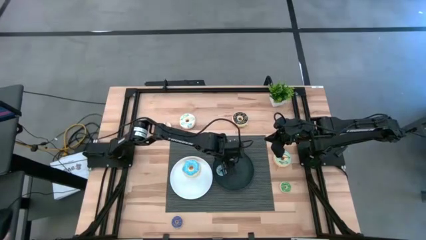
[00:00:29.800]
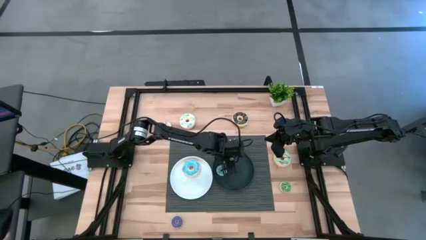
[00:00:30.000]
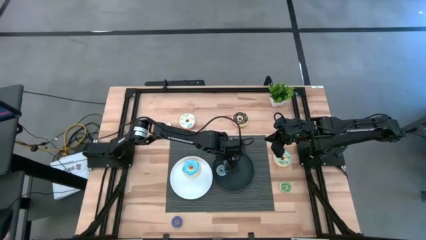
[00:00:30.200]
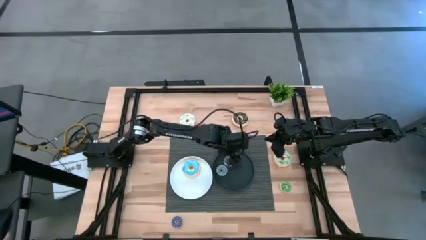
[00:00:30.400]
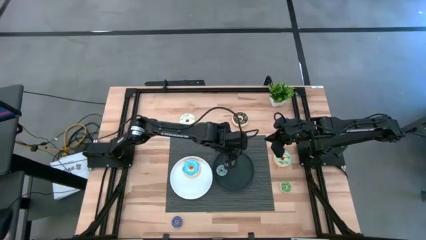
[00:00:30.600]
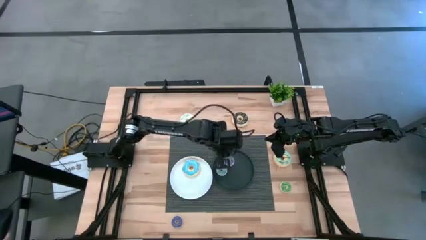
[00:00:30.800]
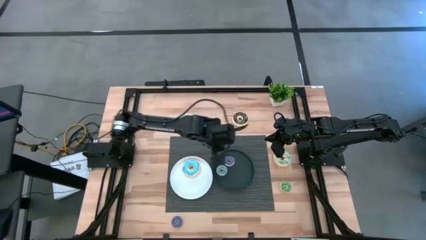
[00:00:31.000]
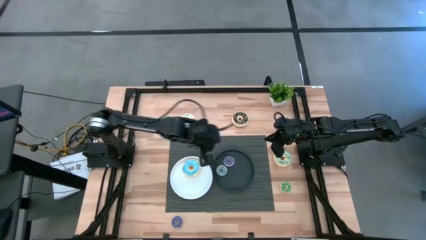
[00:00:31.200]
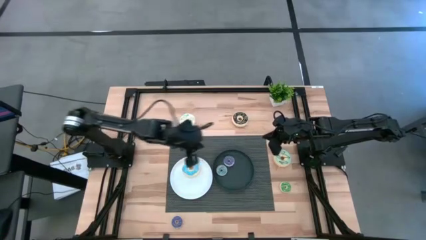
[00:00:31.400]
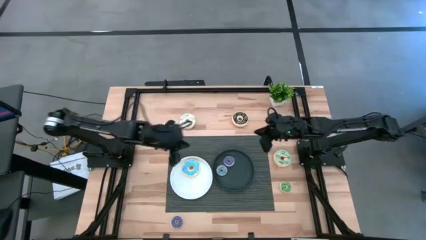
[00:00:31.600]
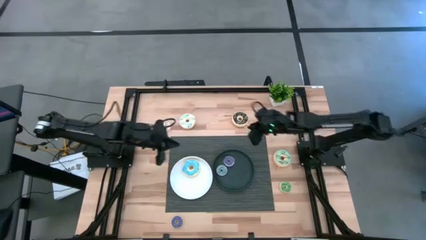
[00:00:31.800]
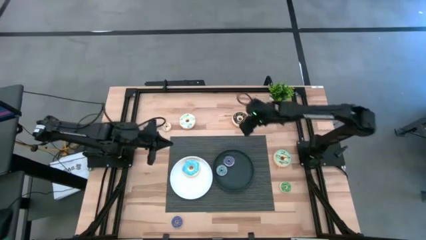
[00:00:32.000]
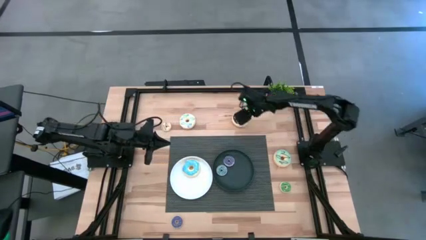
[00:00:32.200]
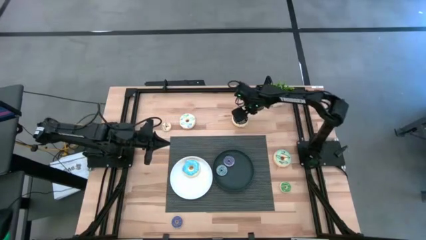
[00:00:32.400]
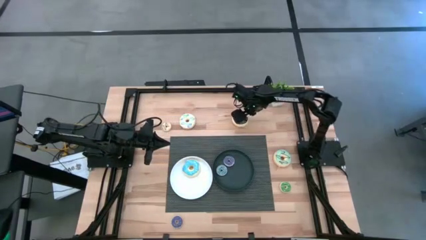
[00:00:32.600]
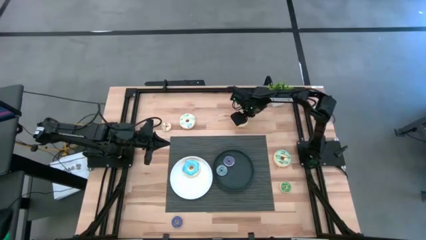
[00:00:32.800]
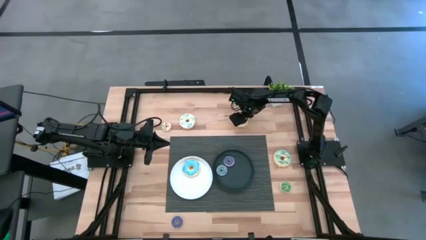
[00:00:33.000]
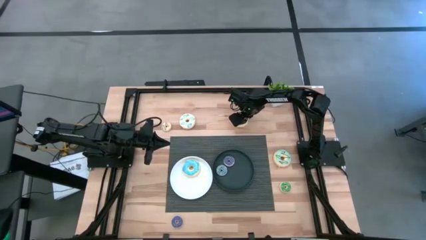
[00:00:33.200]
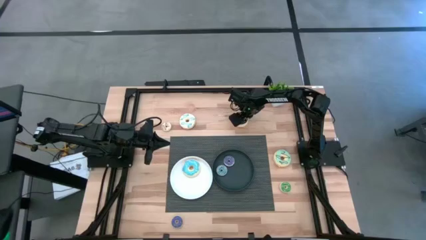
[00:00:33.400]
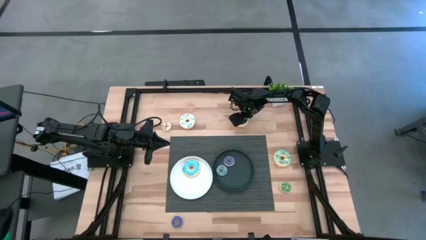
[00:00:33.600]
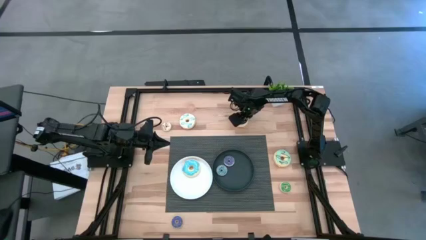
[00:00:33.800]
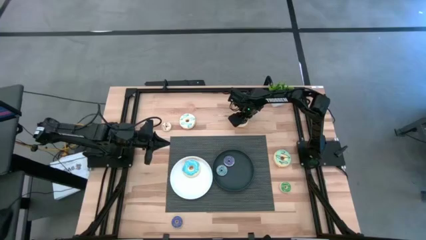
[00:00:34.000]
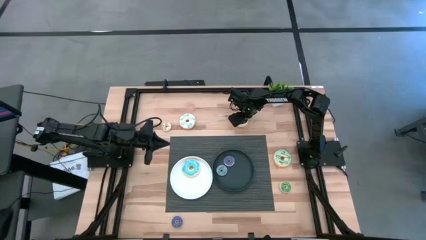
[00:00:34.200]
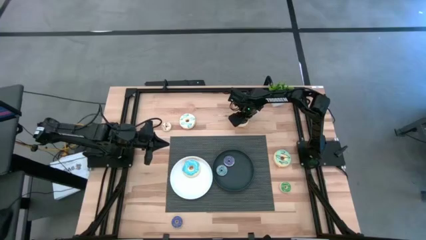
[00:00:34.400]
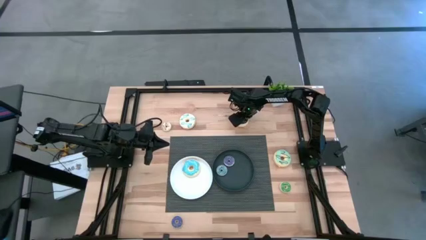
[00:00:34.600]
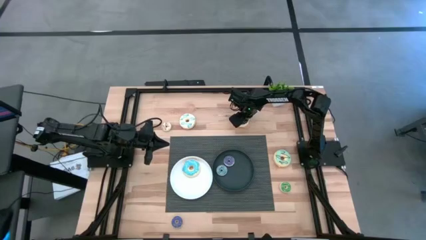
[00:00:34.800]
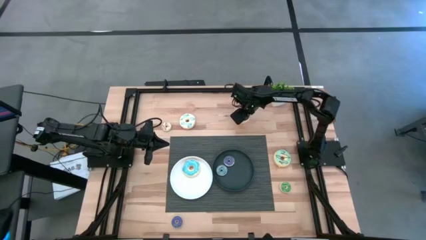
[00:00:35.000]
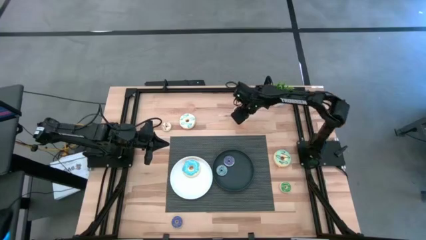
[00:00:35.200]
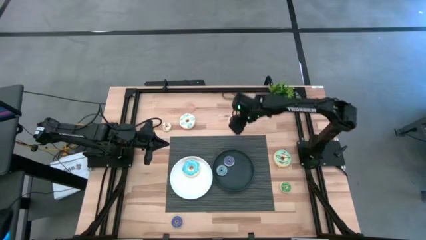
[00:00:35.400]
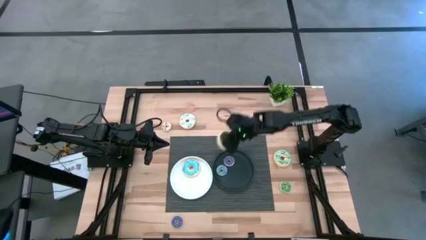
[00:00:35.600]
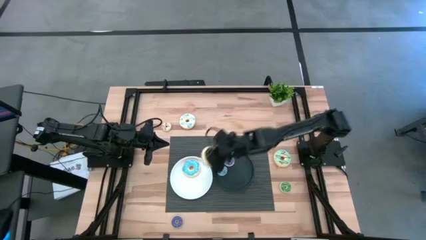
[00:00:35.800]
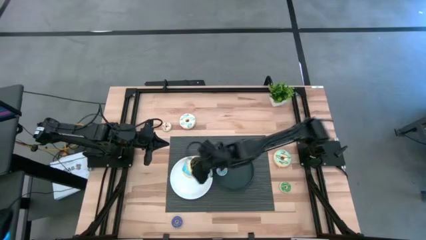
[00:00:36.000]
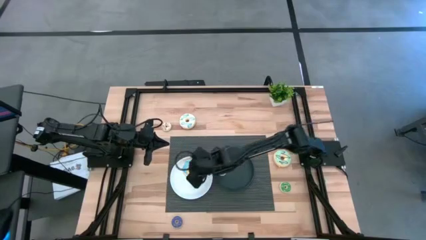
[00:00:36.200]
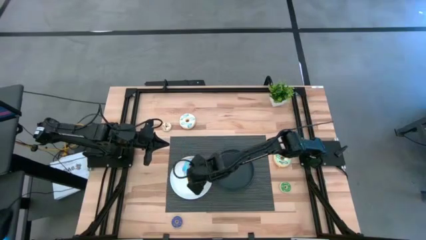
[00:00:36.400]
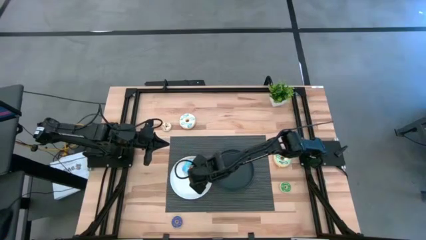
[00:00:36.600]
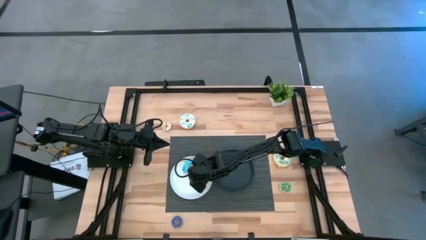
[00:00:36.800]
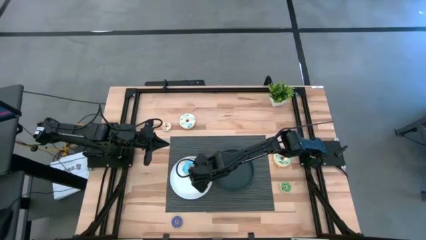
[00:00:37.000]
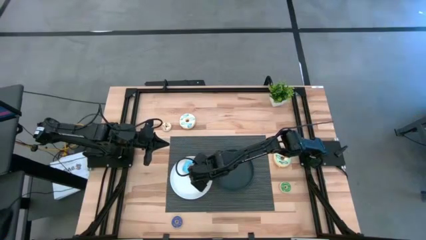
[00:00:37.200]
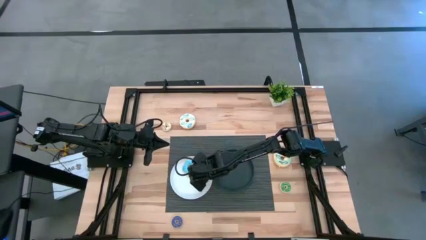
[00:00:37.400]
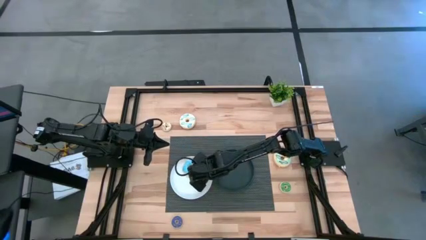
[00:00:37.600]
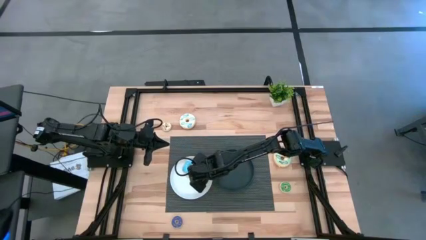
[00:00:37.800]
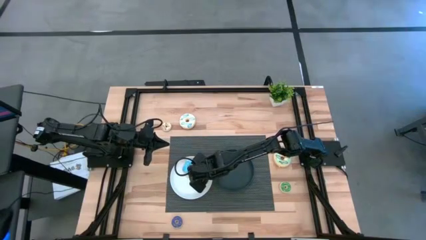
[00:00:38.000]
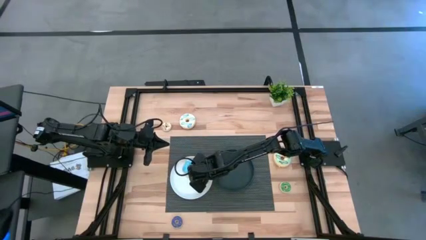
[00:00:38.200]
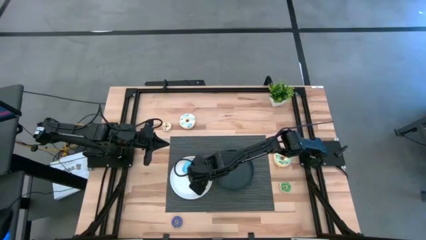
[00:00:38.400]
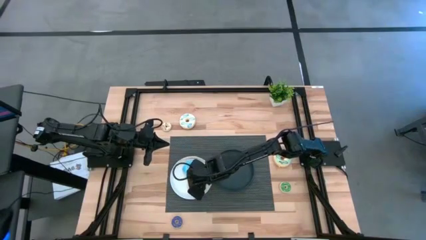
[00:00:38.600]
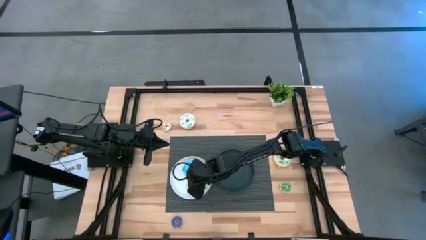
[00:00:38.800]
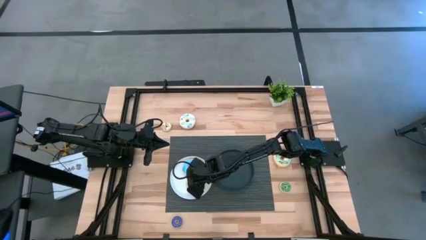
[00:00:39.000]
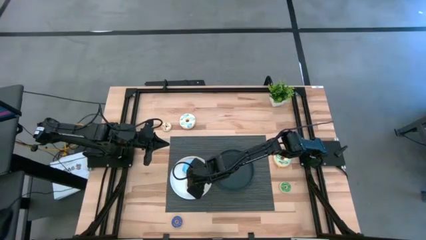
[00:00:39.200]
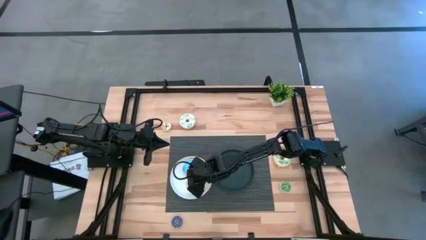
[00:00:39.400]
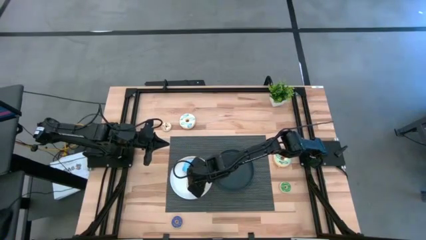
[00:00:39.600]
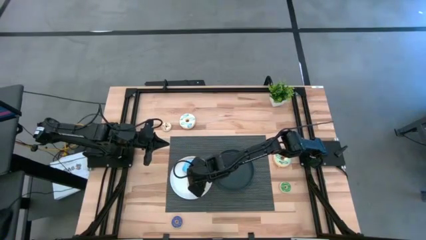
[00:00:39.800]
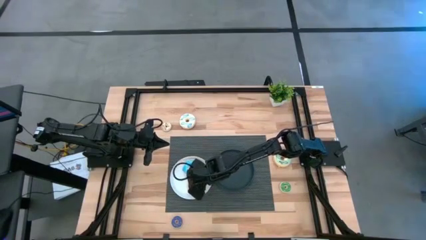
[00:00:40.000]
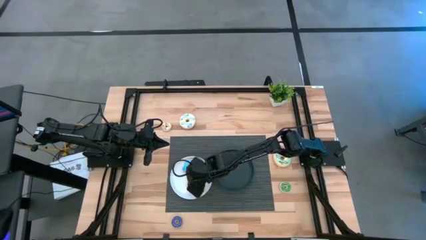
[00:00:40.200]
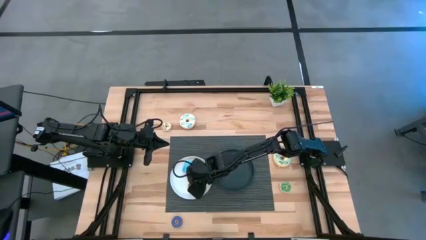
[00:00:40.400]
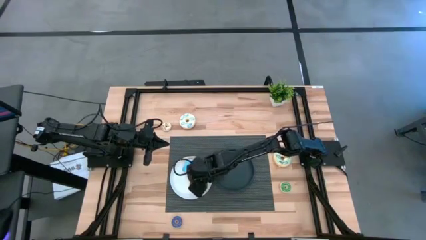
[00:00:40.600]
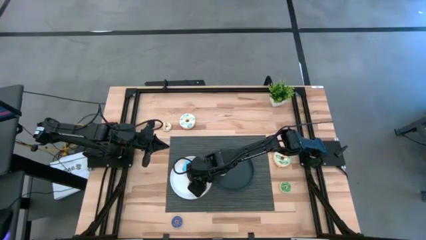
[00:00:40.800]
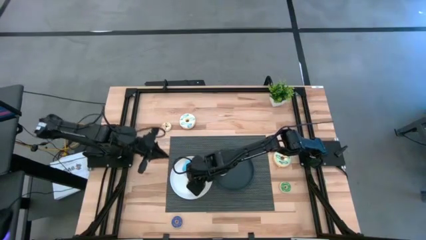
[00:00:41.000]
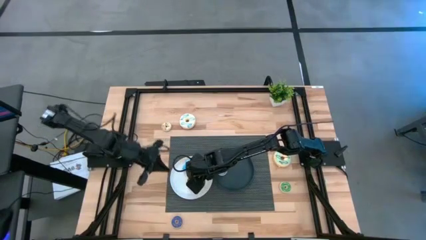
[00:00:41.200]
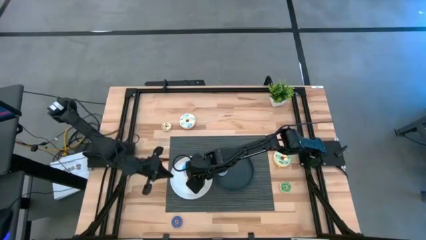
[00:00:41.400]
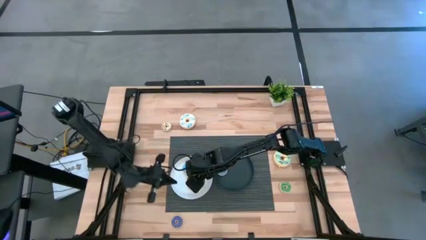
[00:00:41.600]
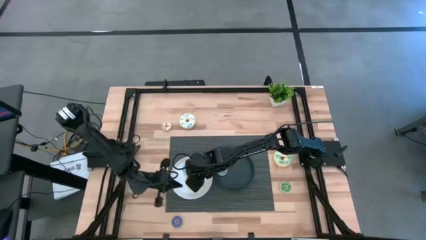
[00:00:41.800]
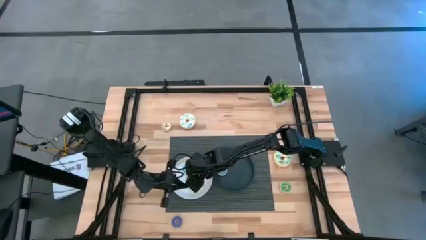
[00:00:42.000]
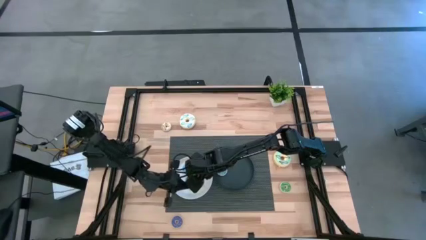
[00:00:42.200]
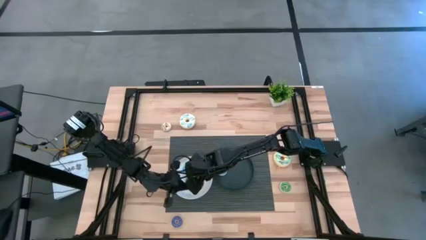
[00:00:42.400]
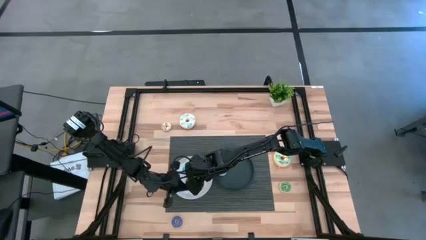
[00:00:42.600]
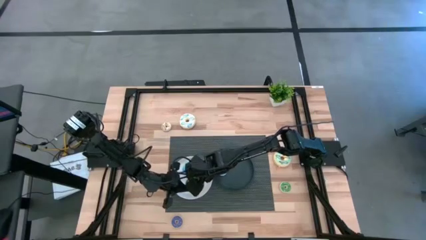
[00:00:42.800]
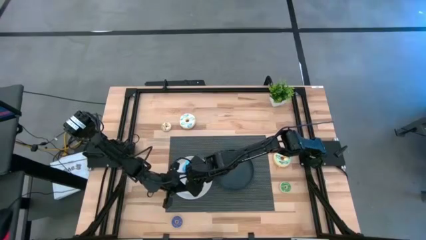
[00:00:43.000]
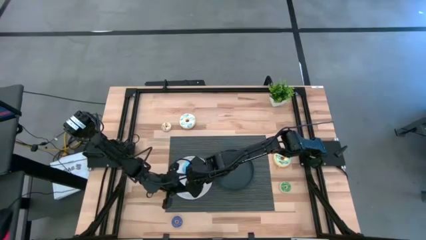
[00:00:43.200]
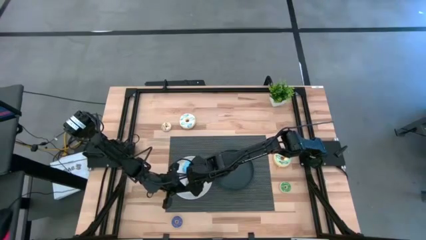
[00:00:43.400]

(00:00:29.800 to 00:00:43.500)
Task: Pick & Place donuts
Put the big black donut on the white plate
